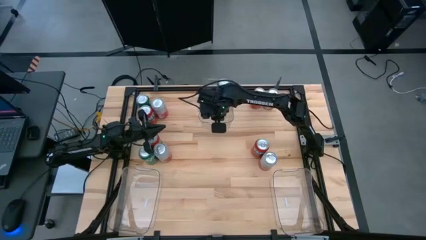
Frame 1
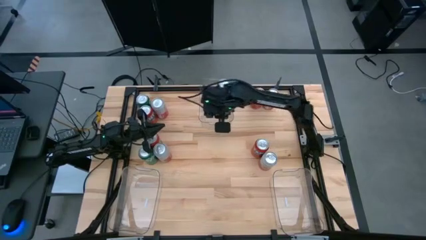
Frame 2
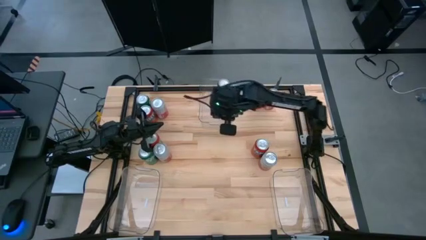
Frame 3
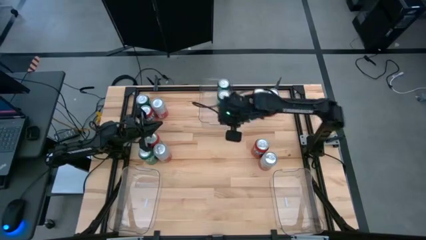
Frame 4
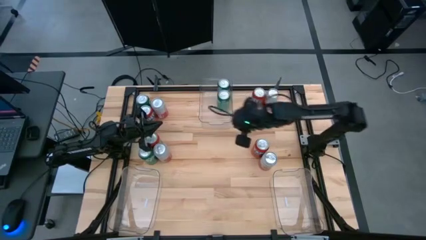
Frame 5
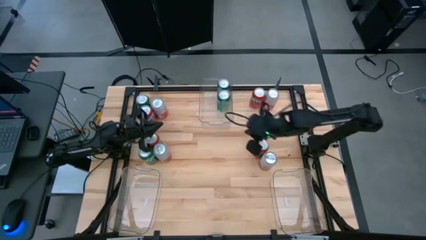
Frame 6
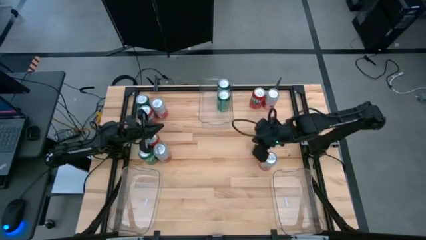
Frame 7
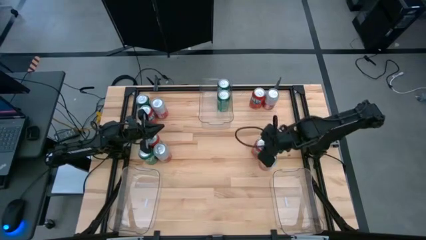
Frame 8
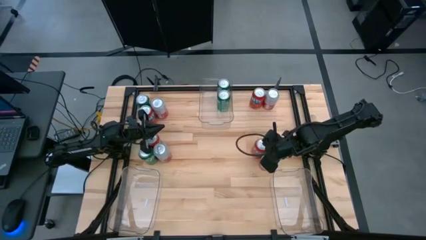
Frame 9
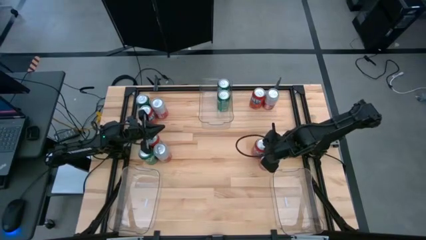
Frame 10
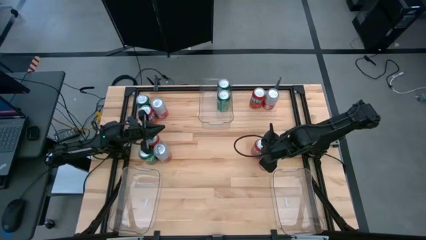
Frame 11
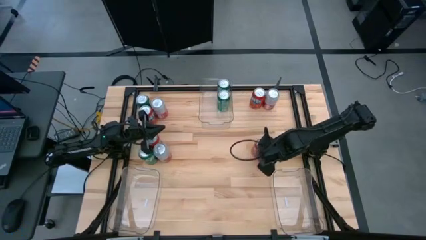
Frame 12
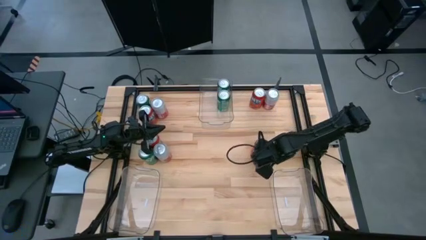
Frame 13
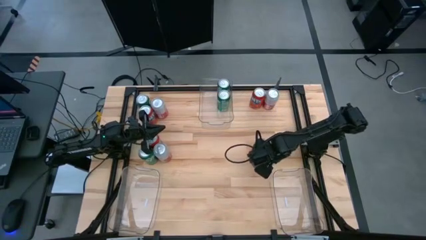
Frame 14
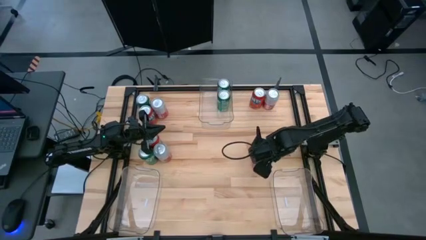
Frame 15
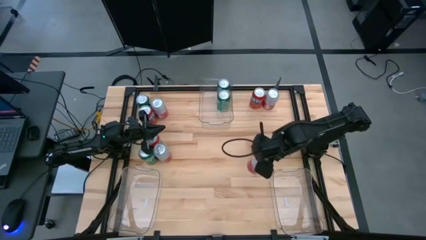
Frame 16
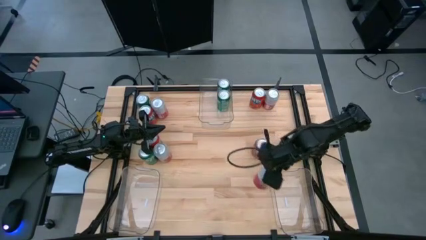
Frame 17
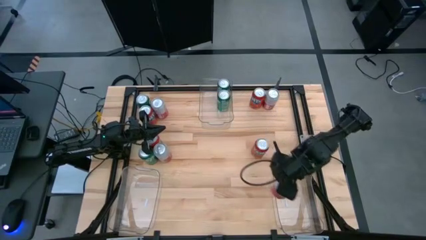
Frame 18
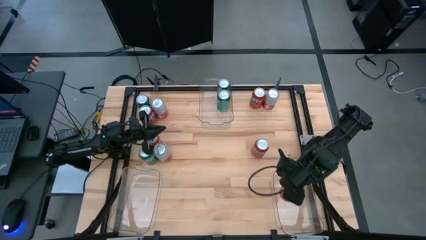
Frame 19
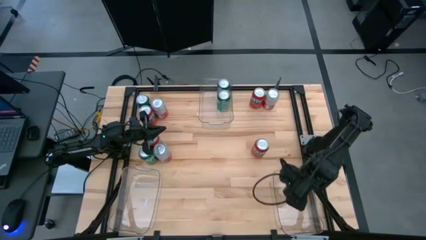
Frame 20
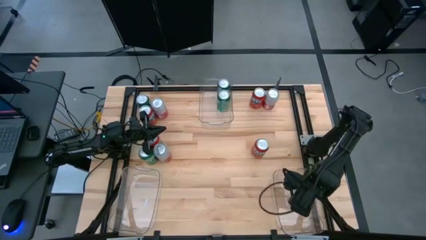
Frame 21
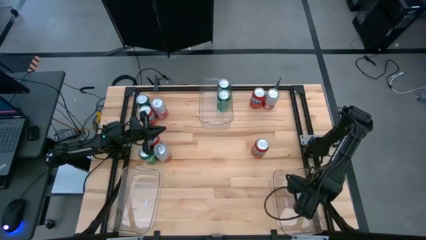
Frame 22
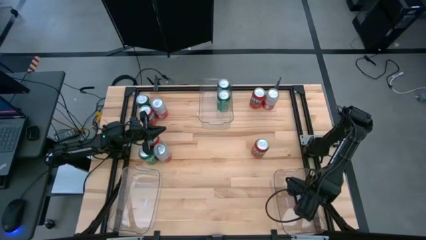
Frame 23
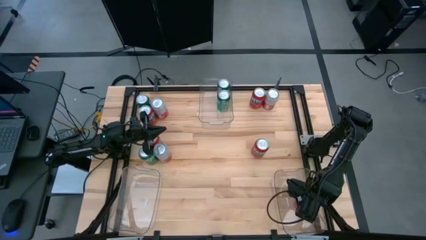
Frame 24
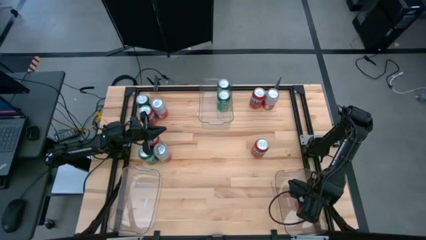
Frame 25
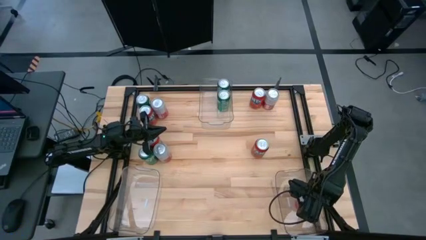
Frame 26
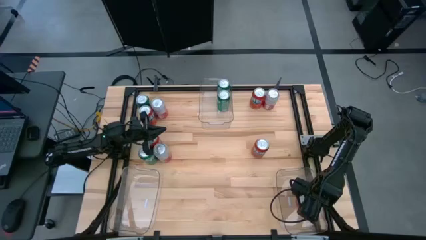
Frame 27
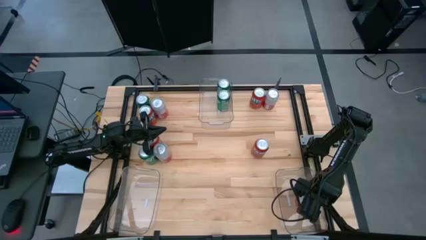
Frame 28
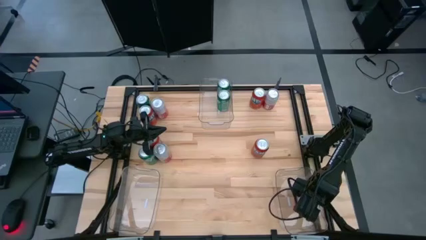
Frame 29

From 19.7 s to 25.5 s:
Task: Sort soda cans
Put the bottom right pink and white soda can into the bottom right transparent bin

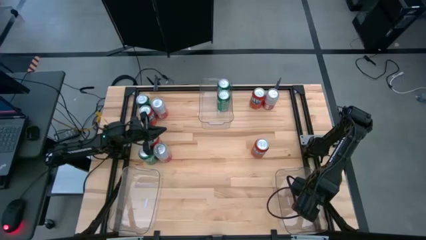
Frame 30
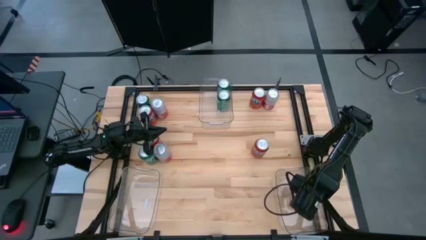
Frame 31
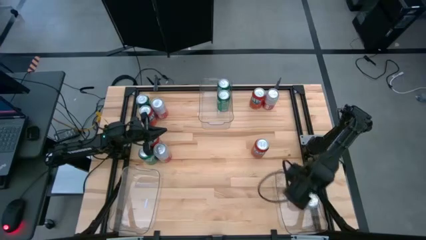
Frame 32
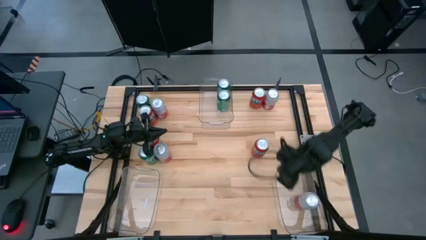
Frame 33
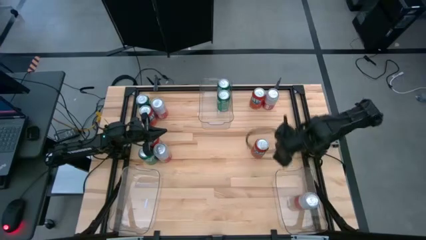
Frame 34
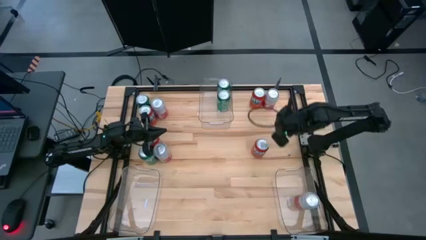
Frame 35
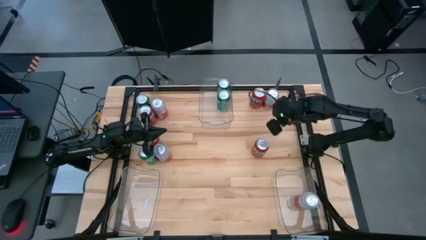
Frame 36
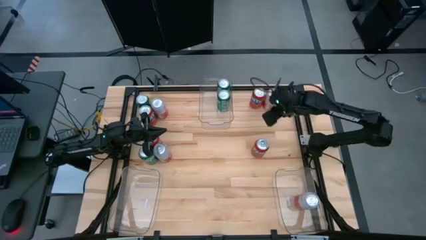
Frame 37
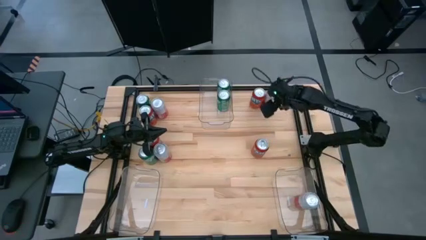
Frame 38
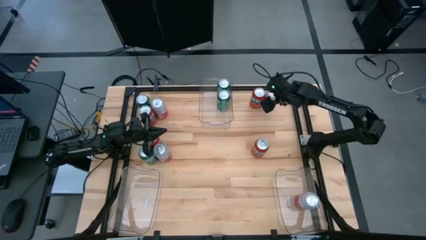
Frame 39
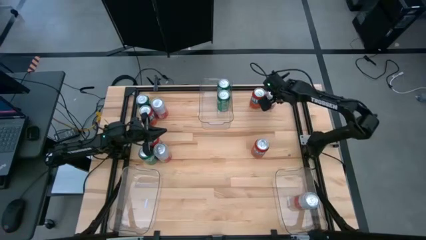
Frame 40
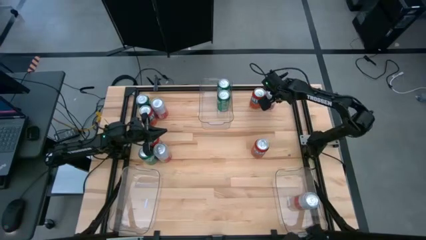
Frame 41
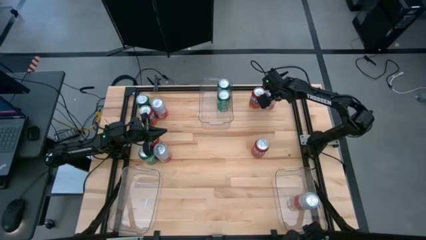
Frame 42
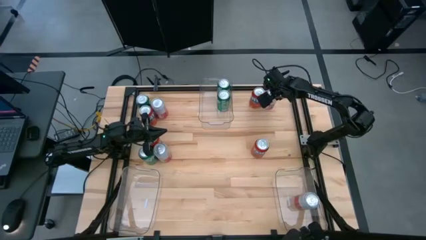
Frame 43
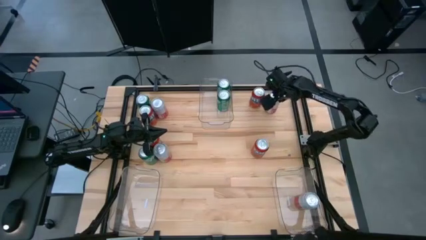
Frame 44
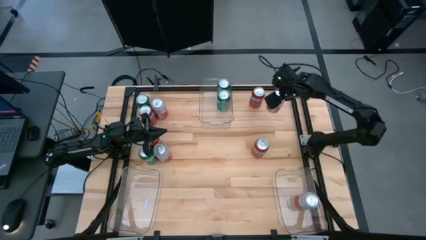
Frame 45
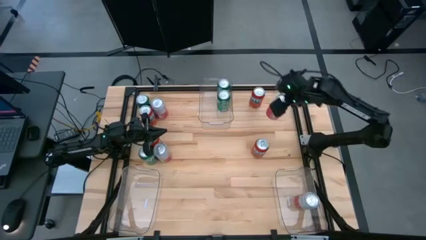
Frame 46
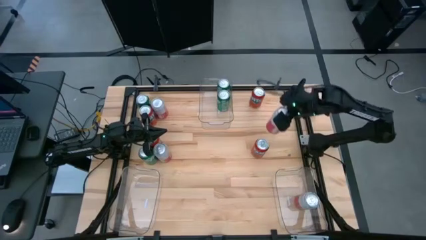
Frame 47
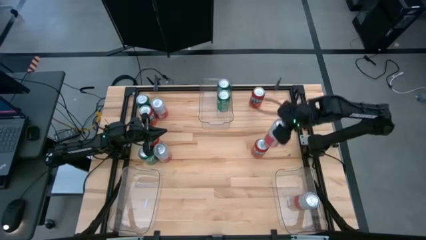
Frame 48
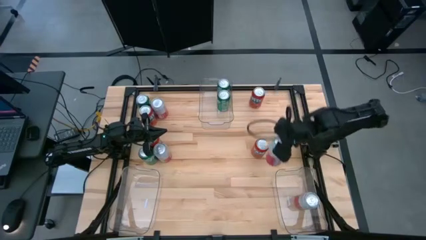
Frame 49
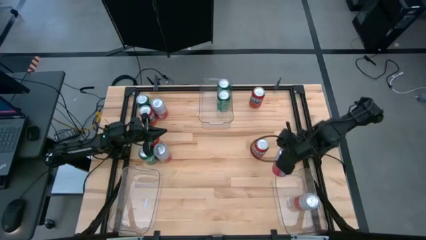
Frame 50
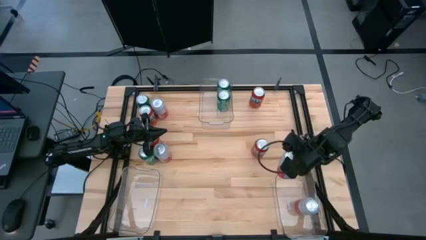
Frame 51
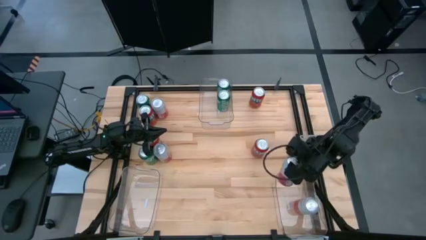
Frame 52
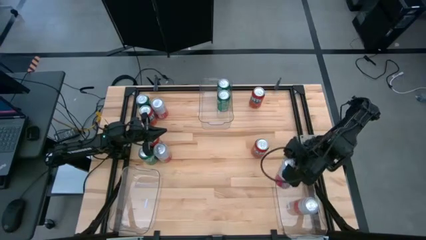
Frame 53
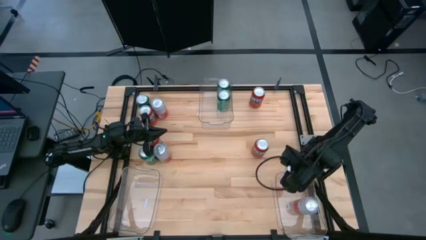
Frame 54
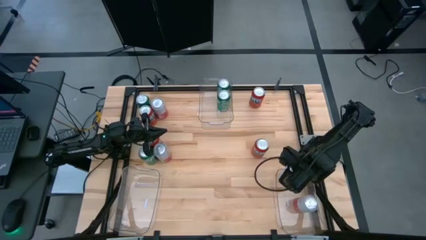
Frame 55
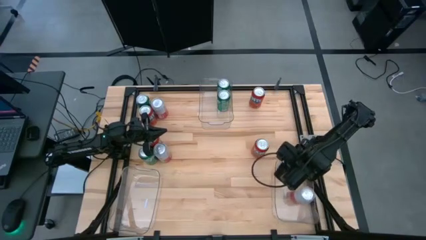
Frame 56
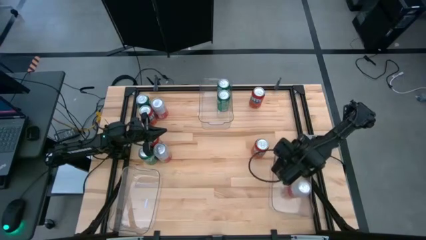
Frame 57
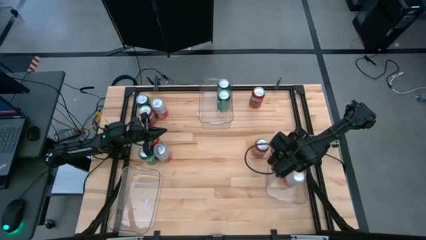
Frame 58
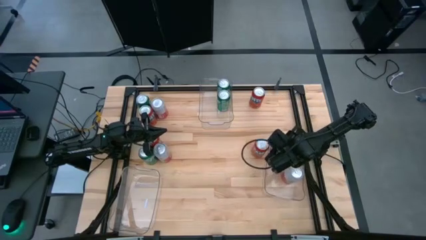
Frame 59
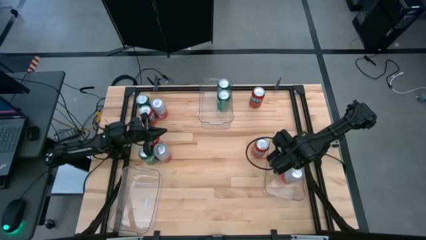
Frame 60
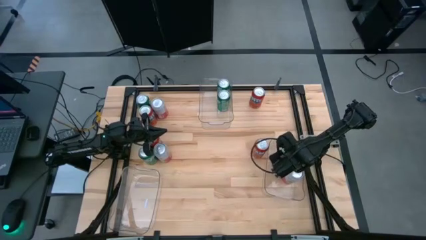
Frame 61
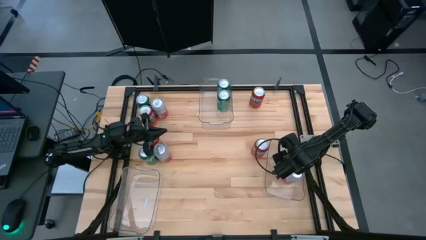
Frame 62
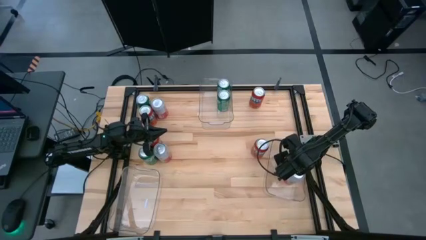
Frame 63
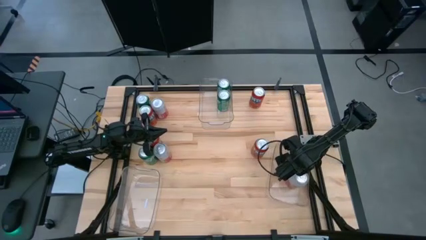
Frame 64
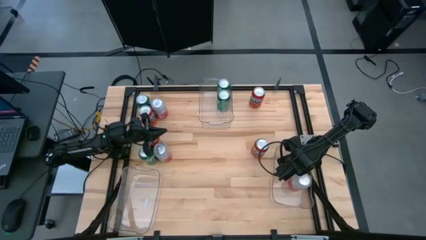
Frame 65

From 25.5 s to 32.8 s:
Put the top right pink and white soda can into the bottom right transparent bin

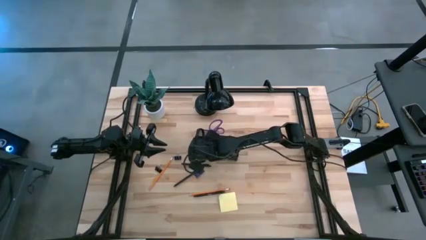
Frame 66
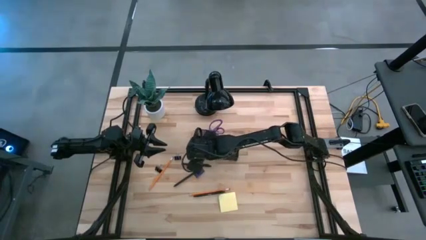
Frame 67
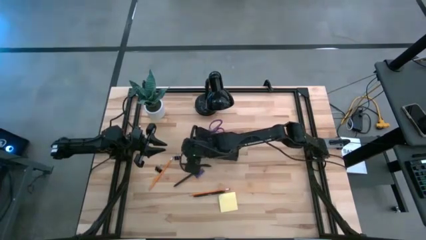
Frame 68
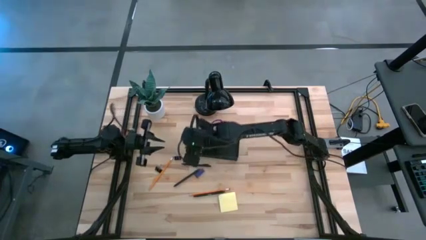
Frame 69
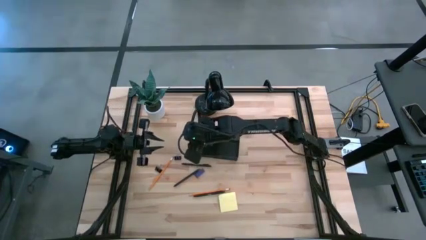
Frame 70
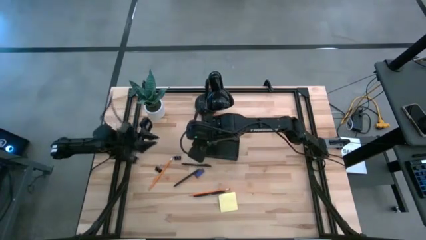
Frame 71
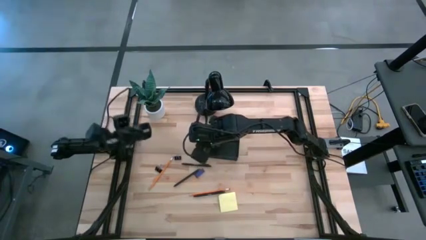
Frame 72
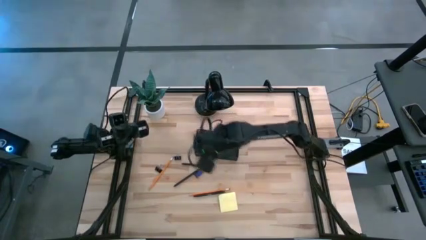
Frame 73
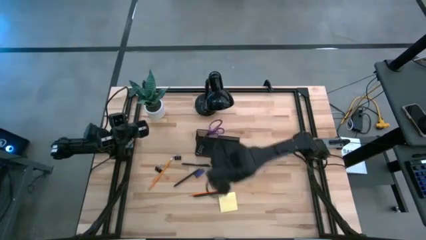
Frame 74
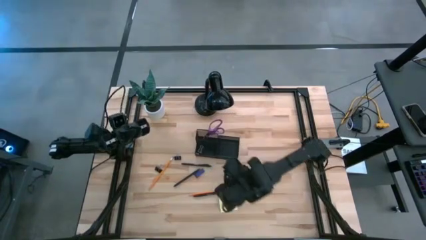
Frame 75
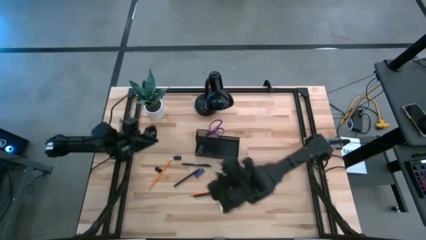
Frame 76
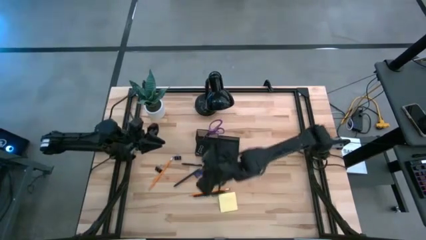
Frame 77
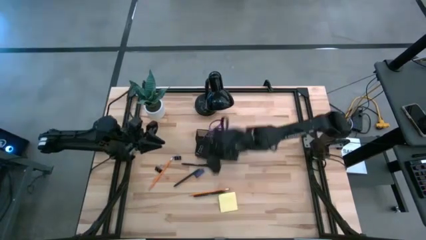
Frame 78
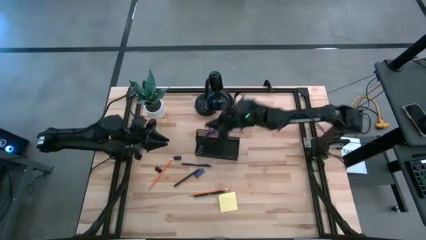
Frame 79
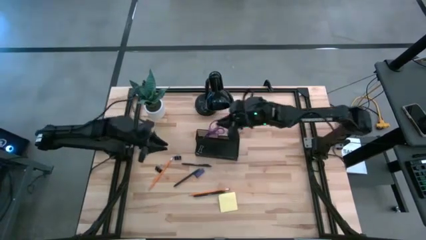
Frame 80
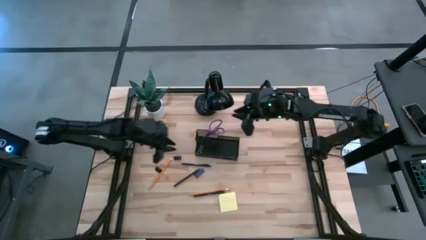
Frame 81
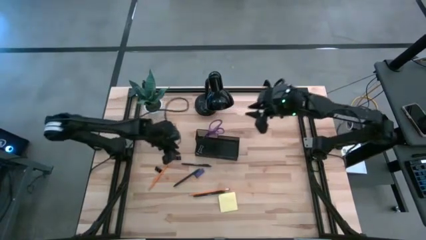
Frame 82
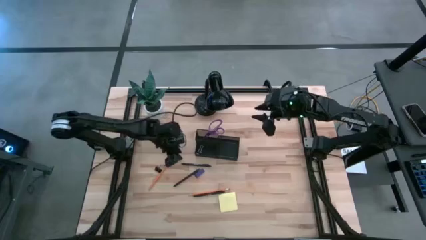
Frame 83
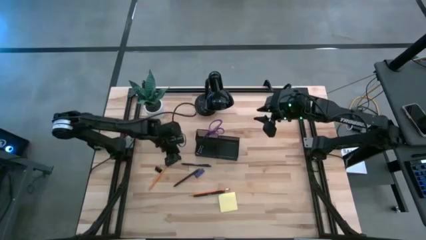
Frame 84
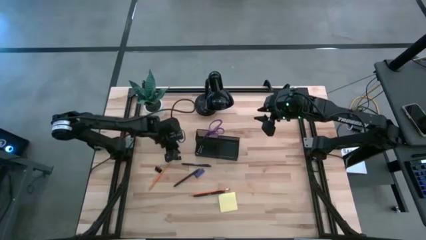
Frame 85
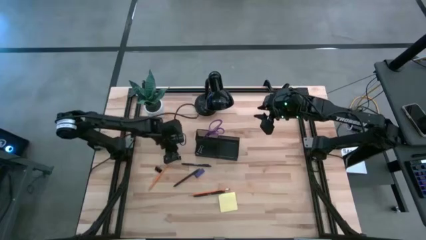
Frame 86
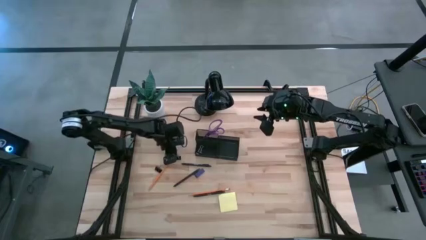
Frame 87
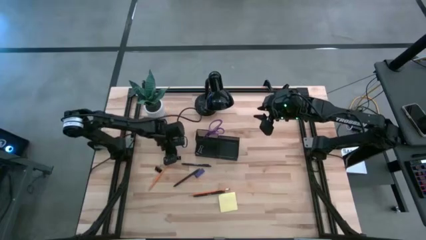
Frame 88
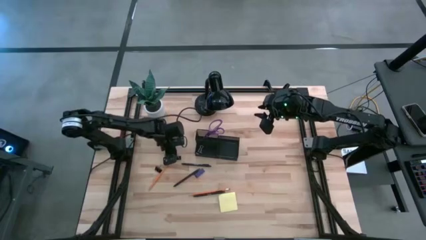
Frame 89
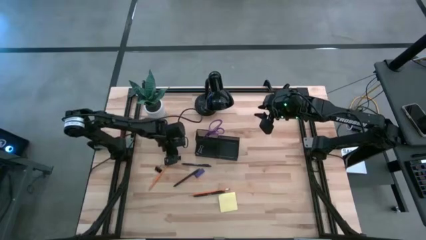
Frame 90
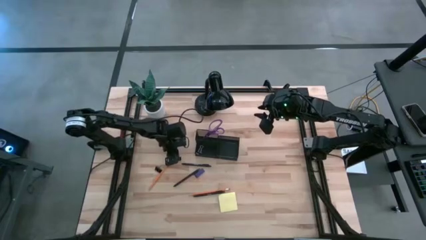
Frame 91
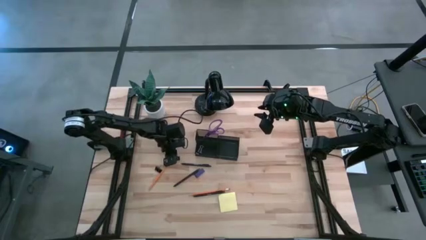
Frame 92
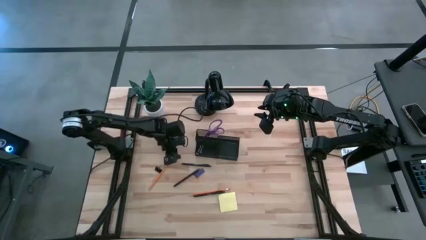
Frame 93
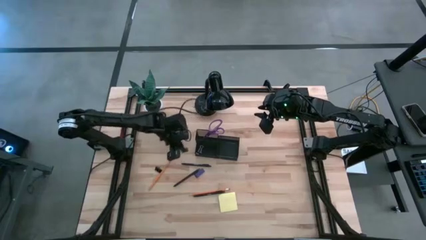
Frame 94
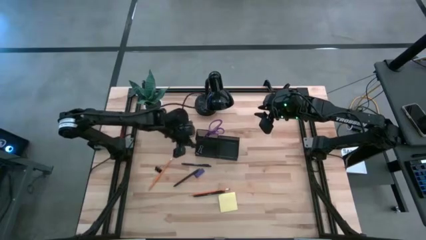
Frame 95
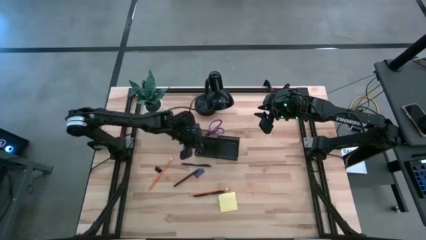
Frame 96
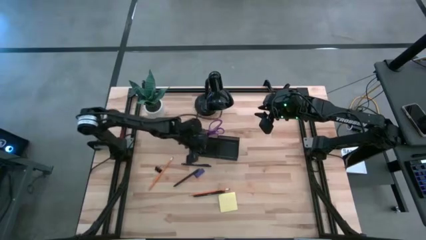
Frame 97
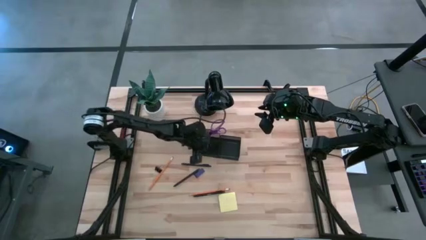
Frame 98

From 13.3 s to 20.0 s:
Task: Pick and place office supplies into organizer
Put the top black binder clip into the black desk organizer
